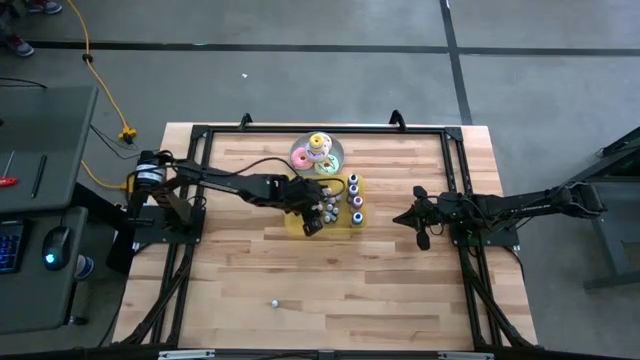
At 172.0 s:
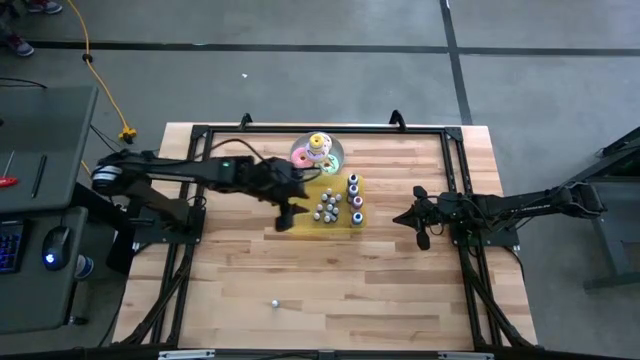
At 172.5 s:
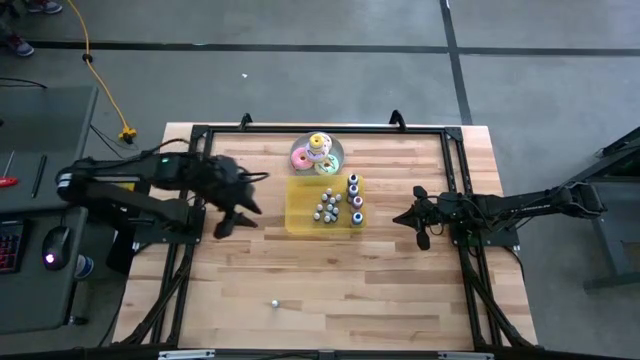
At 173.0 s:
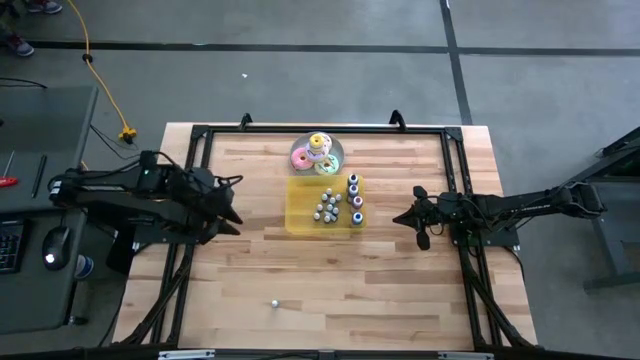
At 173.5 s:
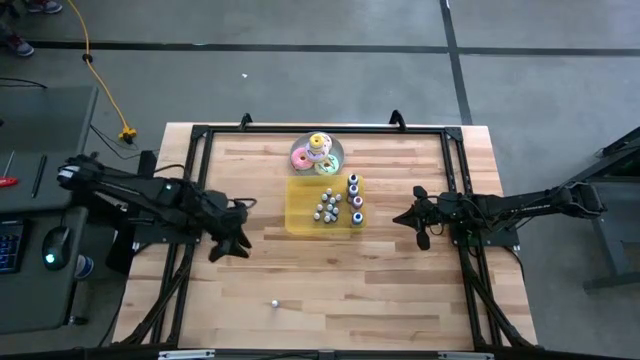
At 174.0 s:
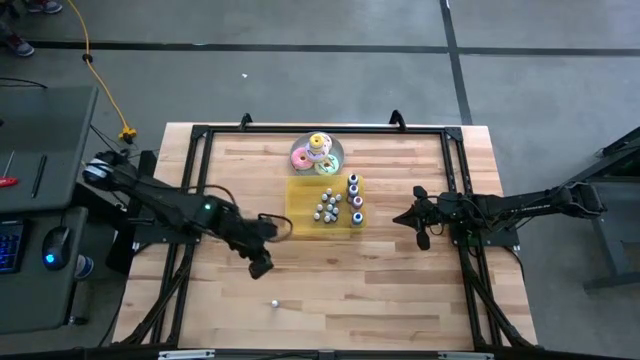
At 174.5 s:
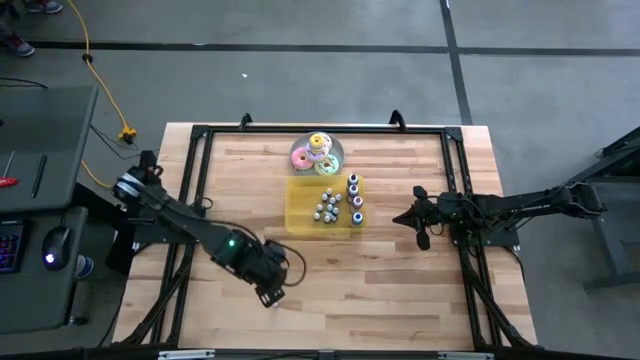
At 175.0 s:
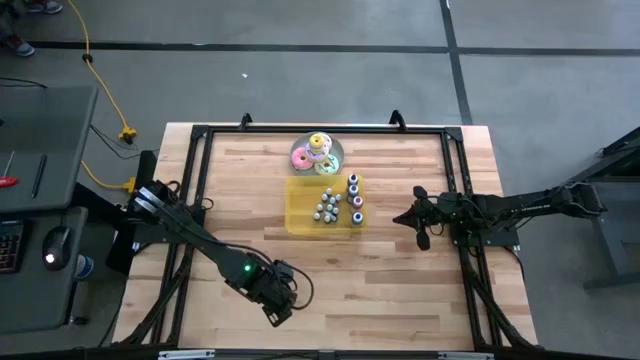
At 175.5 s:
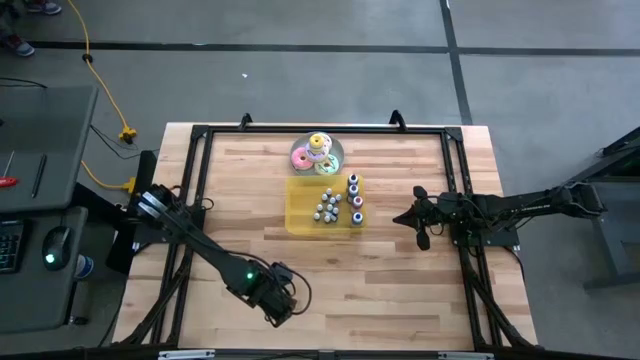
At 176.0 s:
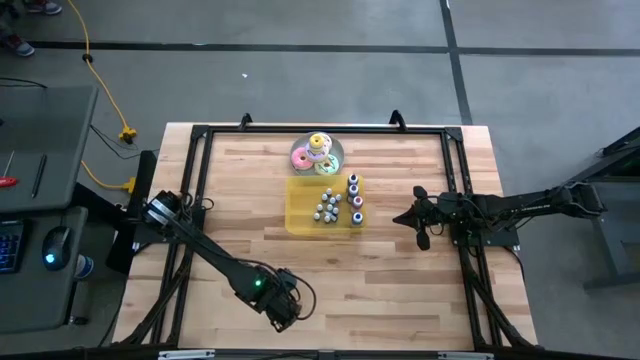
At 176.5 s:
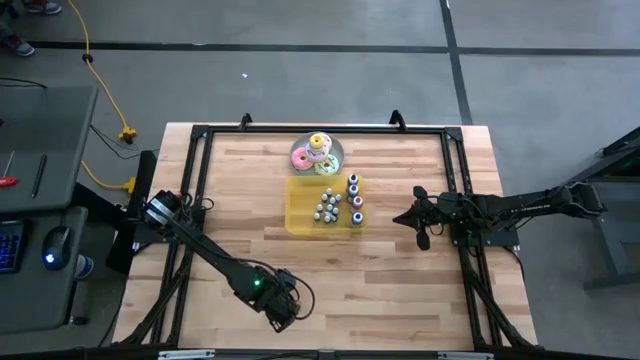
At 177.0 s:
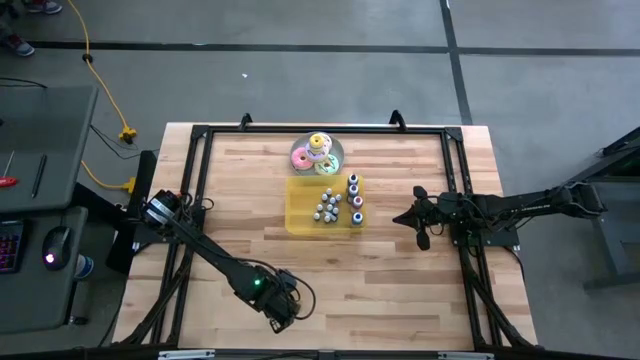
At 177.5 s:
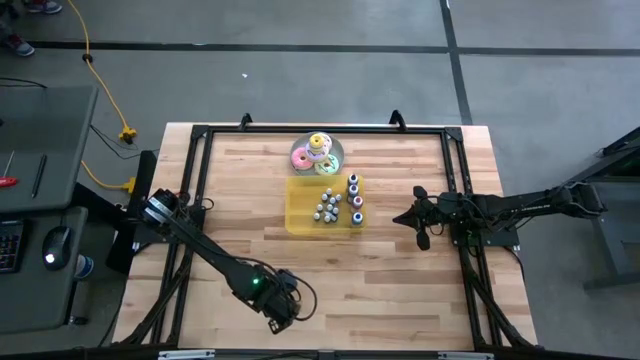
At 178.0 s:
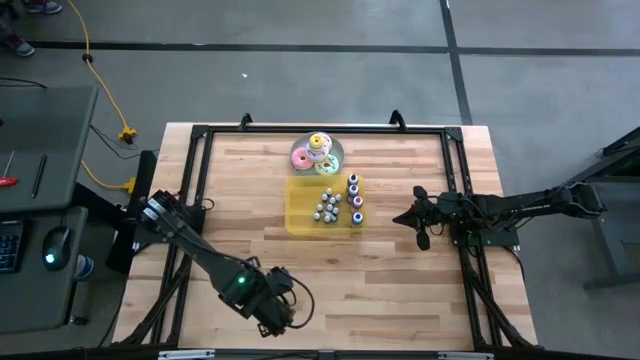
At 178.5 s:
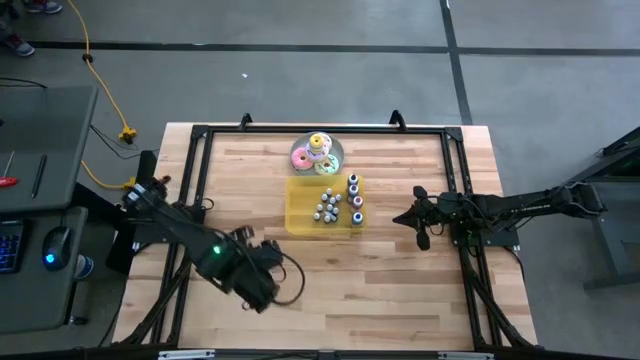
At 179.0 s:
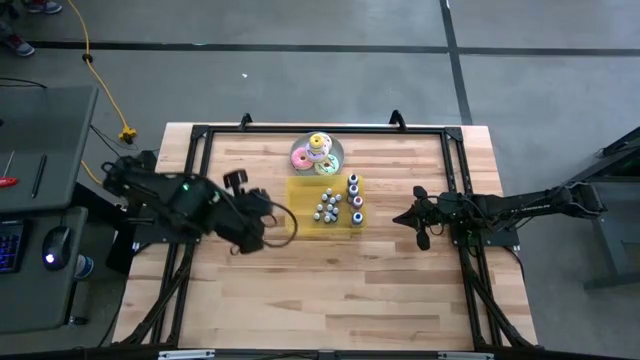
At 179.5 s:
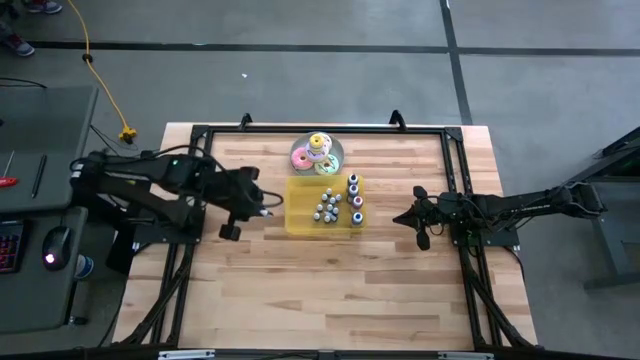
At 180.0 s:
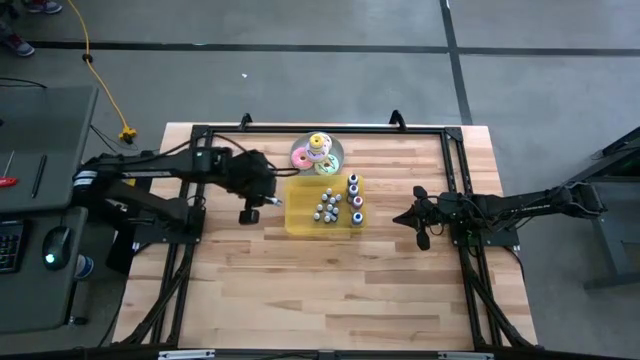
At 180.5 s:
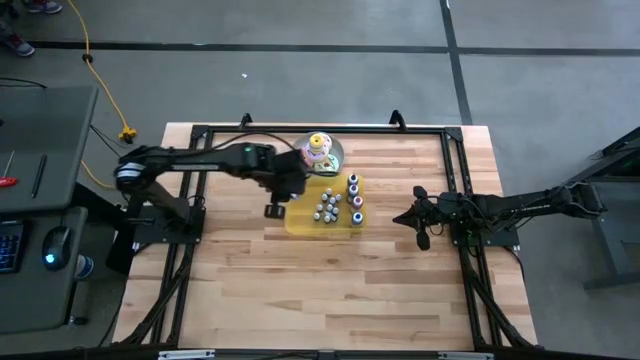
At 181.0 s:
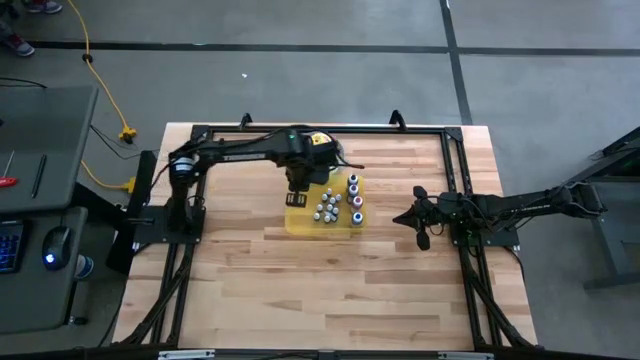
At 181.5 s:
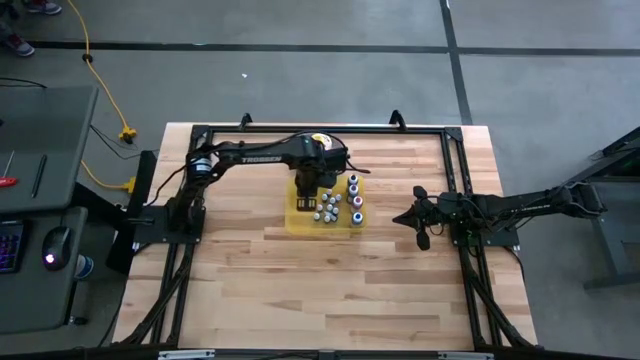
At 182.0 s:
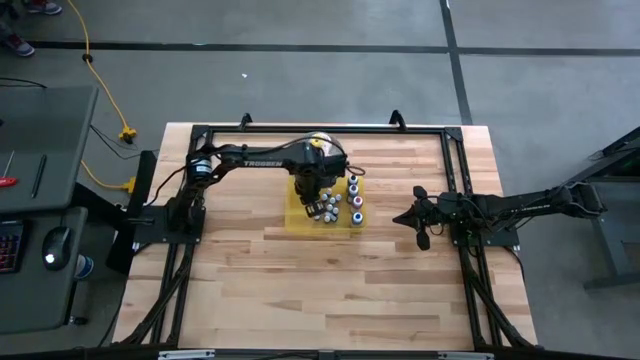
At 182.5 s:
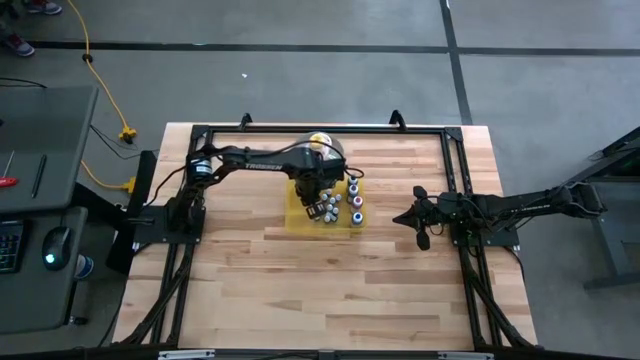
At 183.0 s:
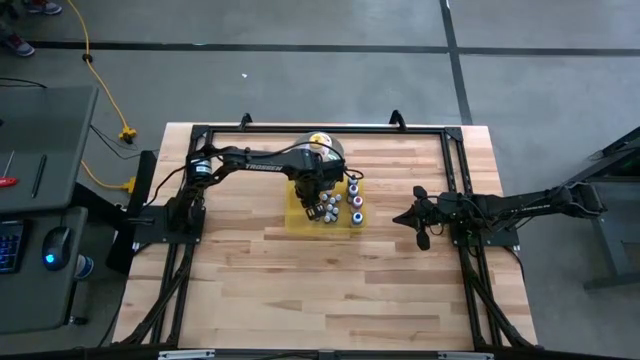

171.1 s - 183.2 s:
Task: Pick & Place food coloring
Put the small black food coloring bottle into the yellow container

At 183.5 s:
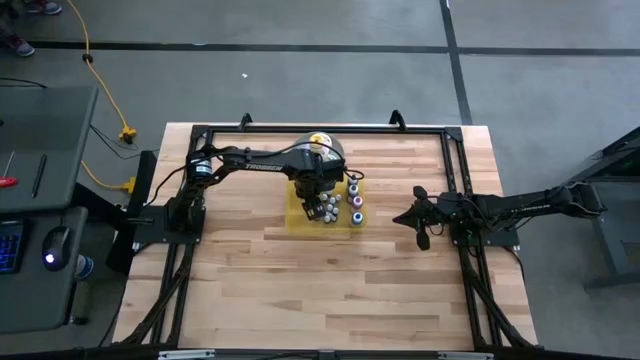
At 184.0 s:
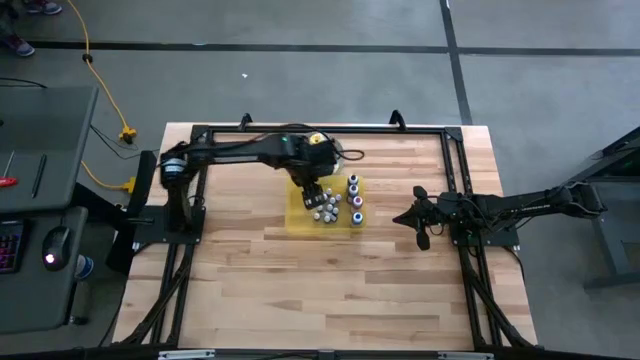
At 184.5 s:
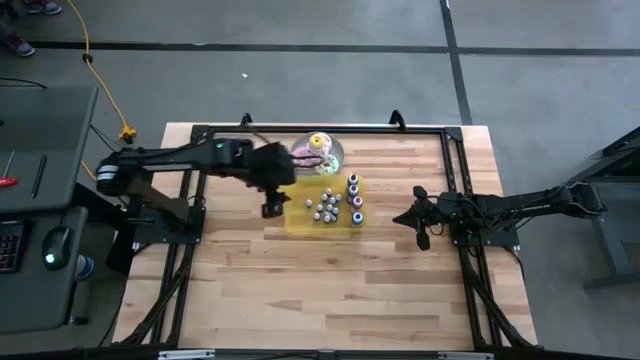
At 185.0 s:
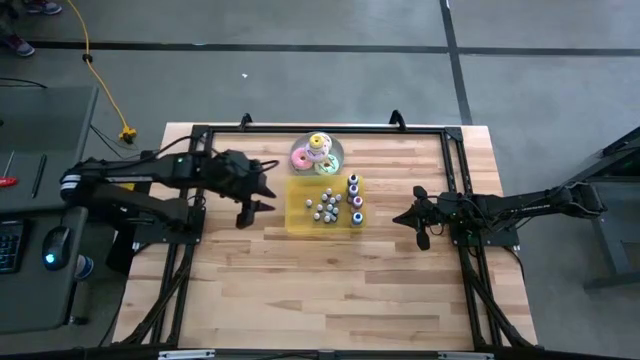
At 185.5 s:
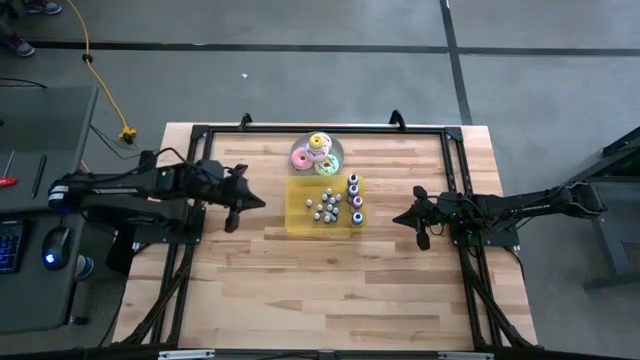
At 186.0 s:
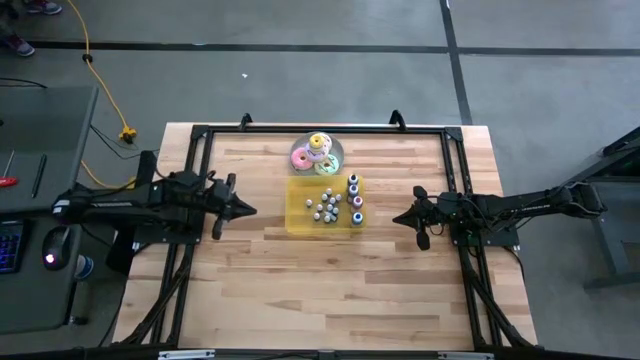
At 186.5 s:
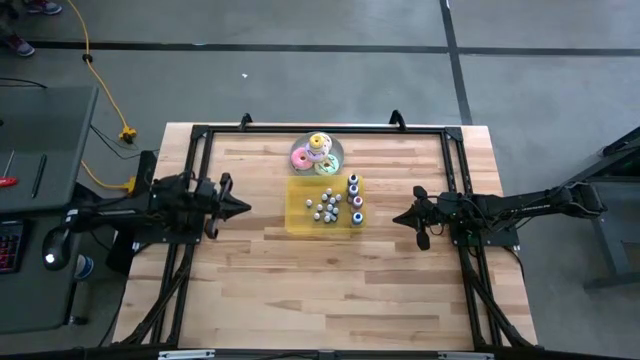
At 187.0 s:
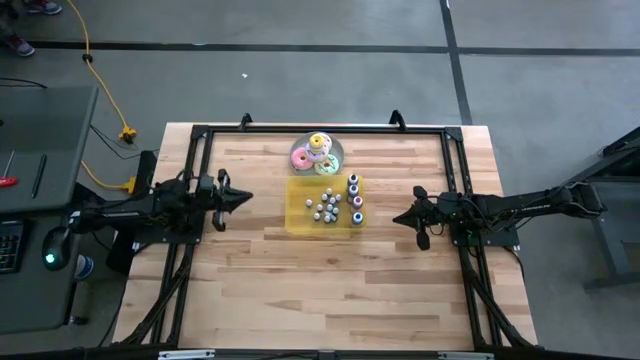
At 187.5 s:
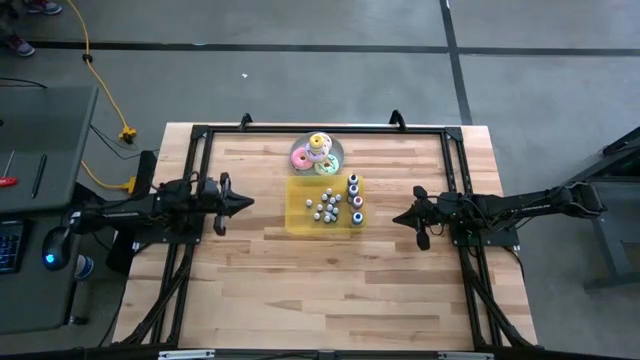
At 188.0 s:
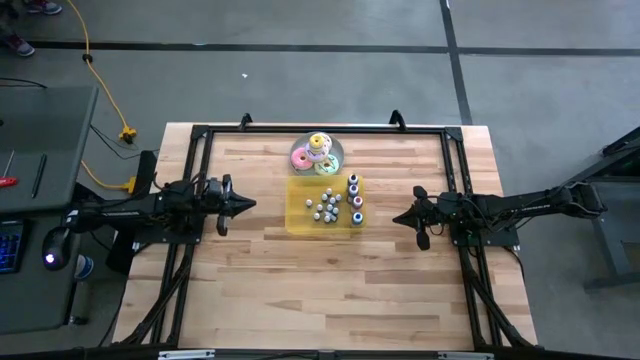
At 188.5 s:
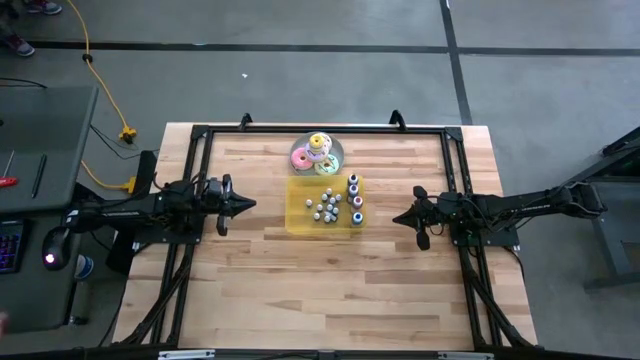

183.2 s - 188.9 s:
Return to Home Position

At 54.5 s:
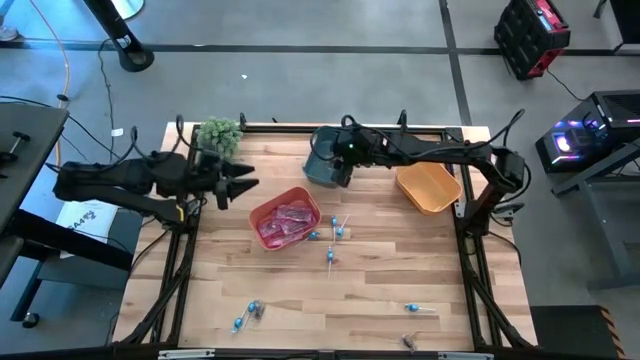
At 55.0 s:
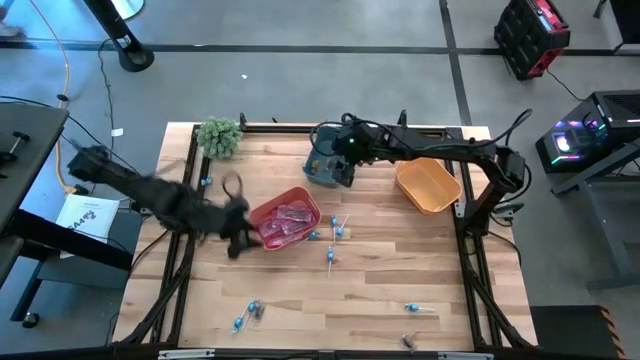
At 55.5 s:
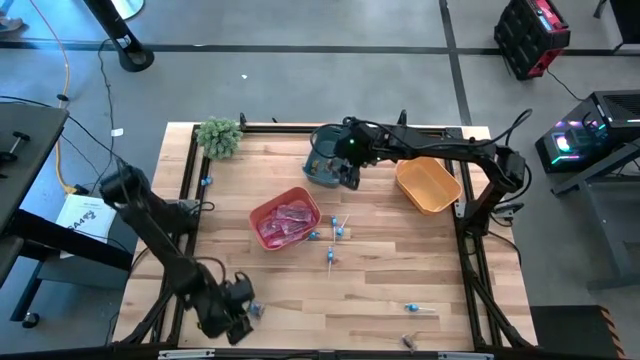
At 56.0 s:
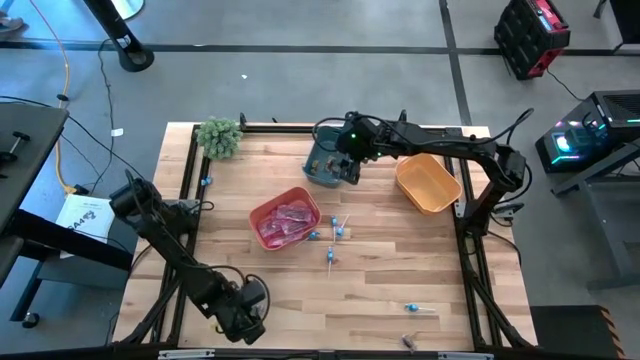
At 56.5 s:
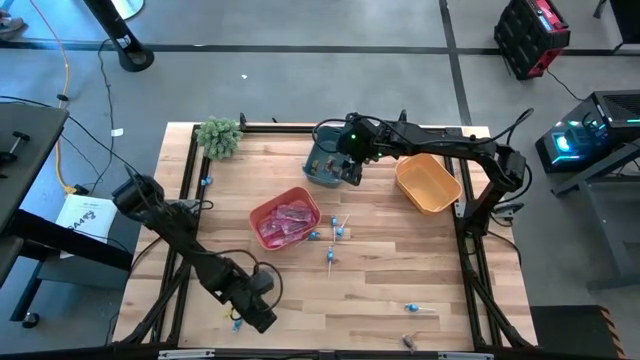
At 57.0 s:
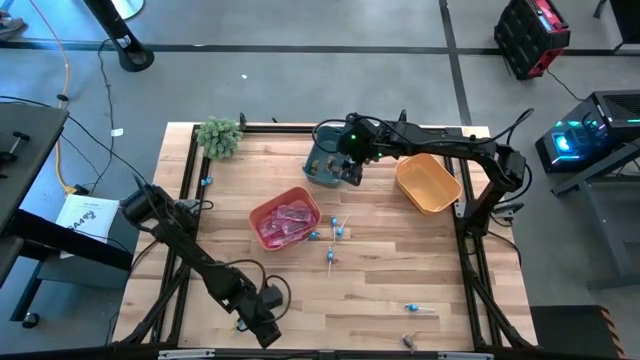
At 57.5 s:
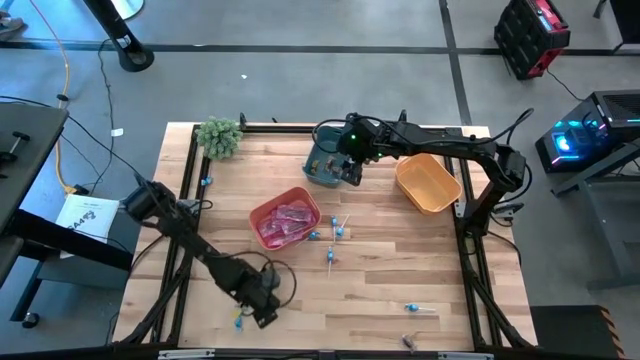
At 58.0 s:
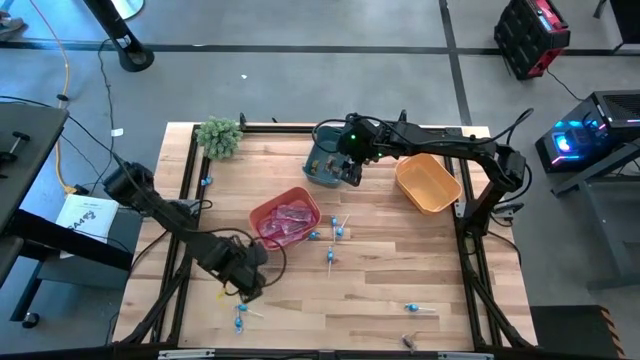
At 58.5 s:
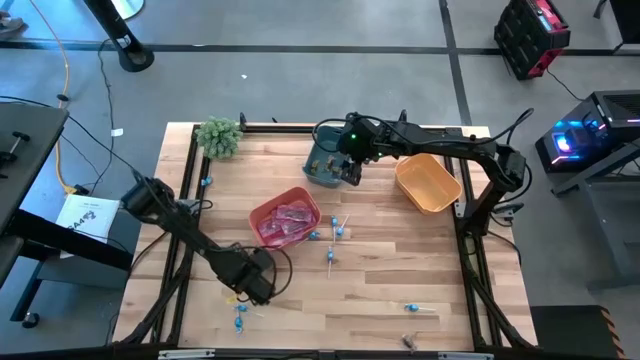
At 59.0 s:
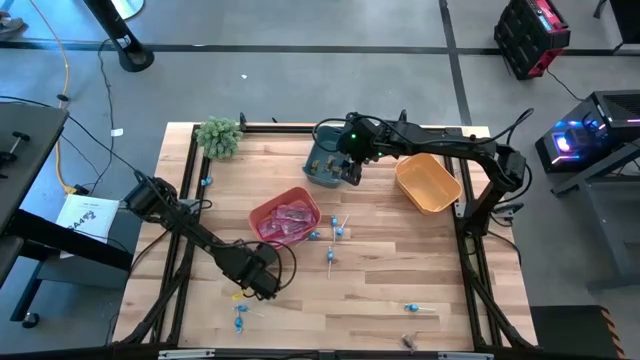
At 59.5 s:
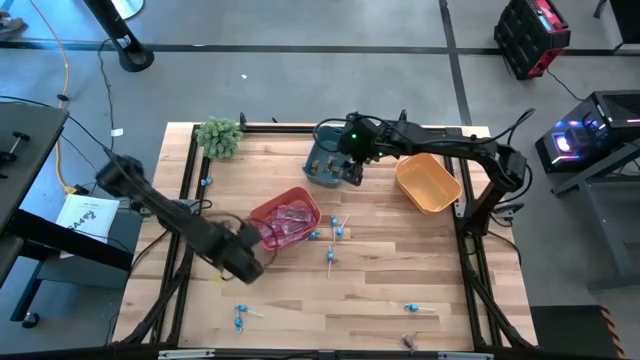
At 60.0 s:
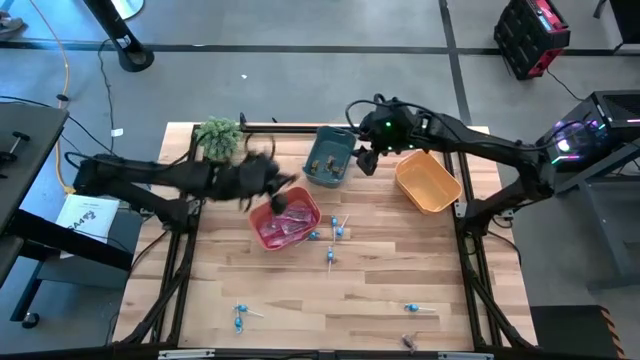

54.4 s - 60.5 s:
Task: Sort candy
Put the black candy into the blue bin
